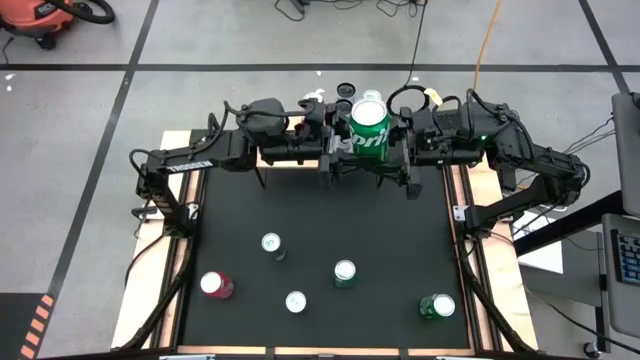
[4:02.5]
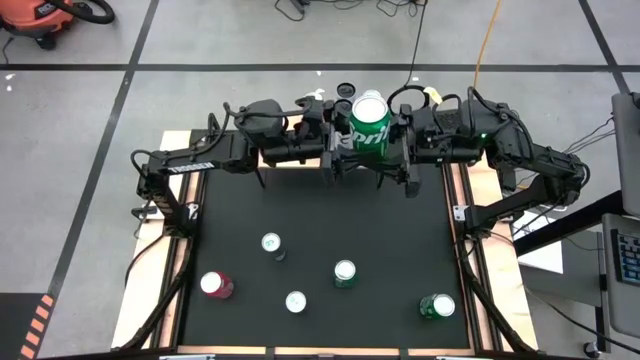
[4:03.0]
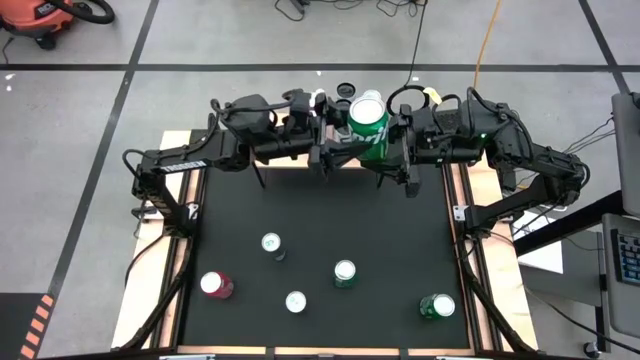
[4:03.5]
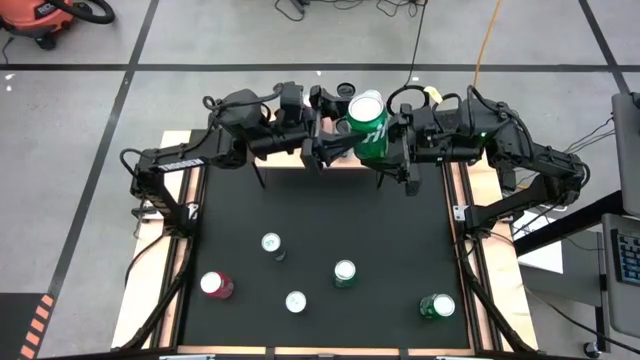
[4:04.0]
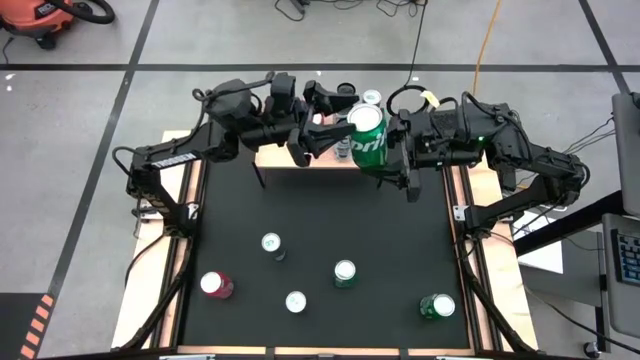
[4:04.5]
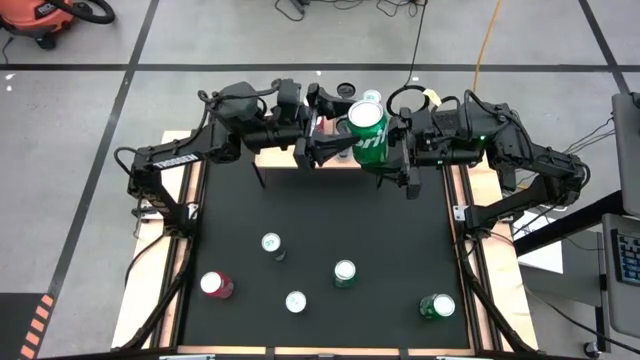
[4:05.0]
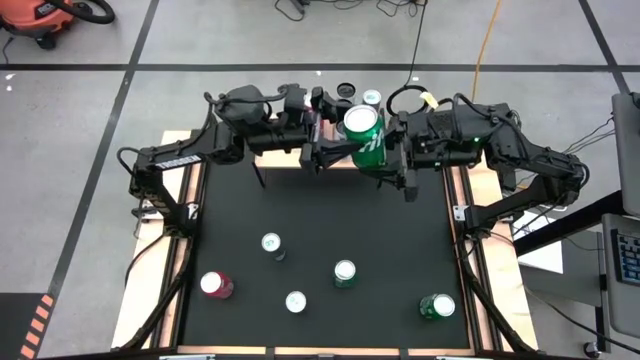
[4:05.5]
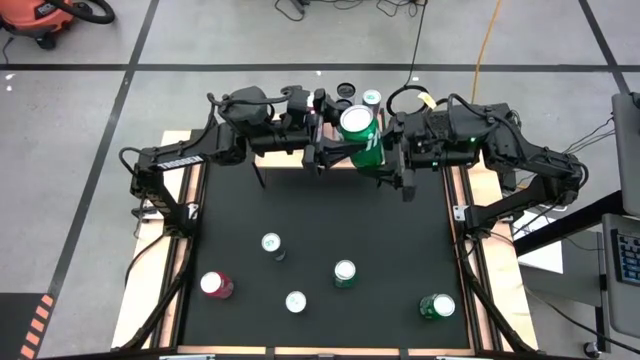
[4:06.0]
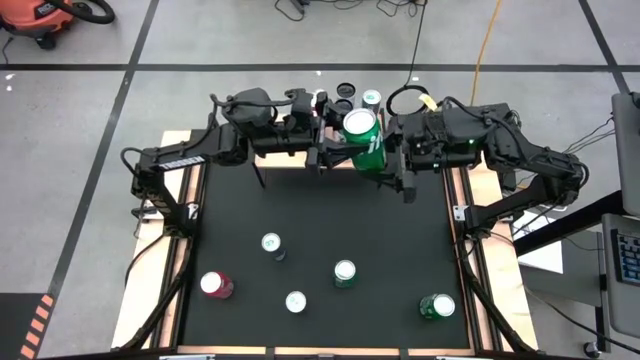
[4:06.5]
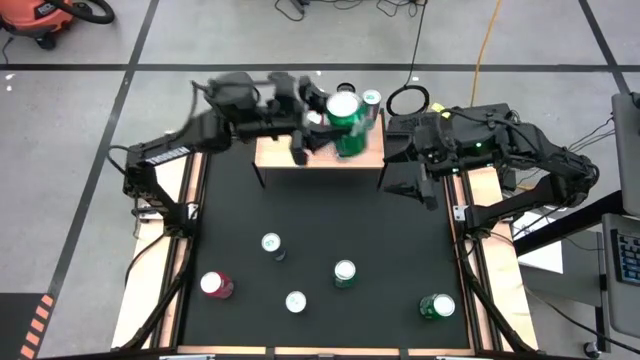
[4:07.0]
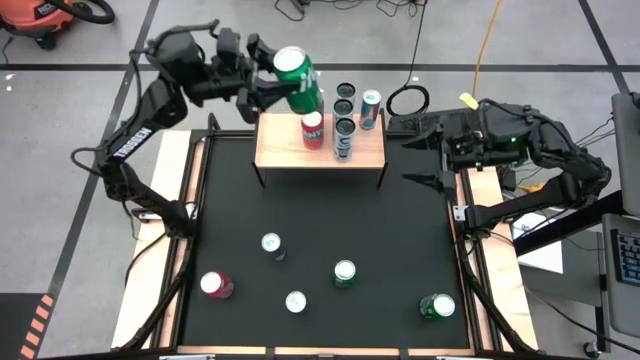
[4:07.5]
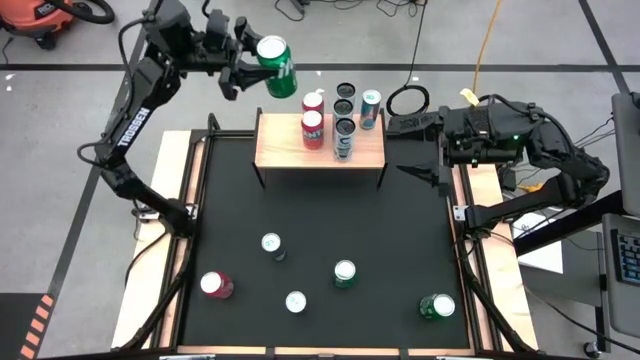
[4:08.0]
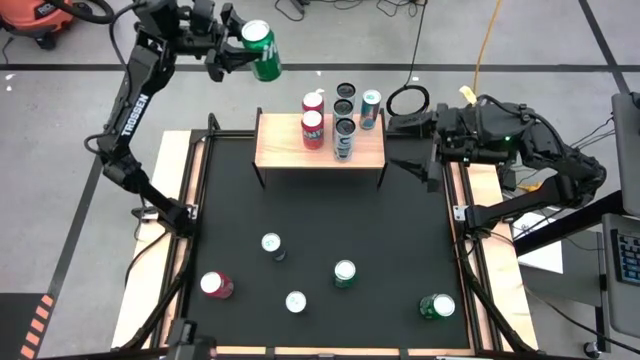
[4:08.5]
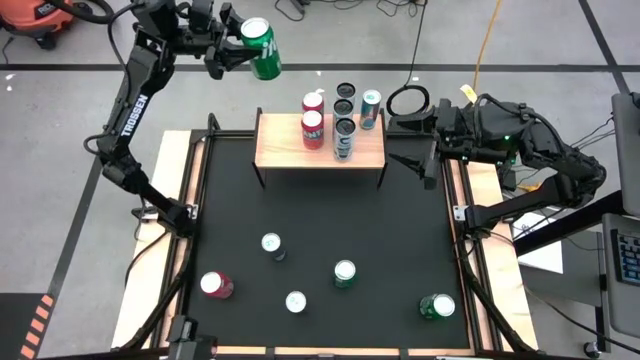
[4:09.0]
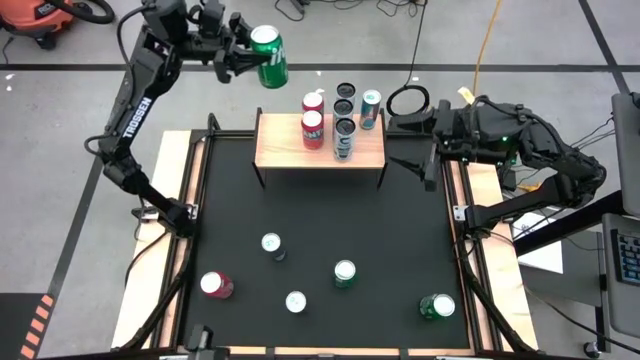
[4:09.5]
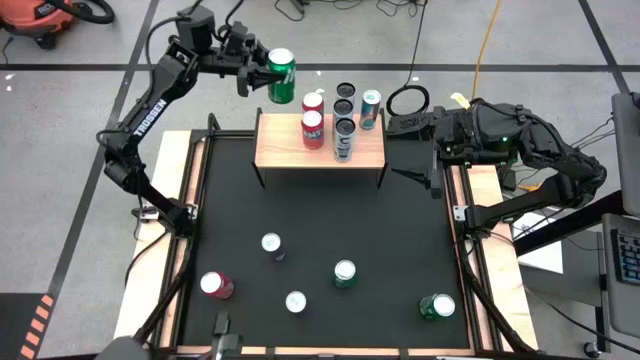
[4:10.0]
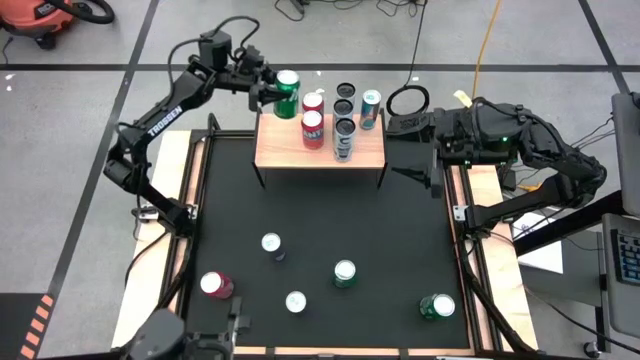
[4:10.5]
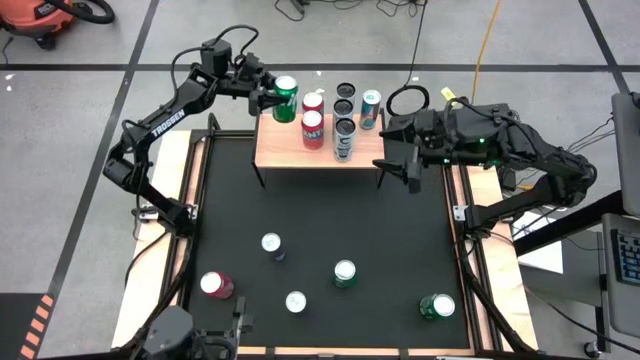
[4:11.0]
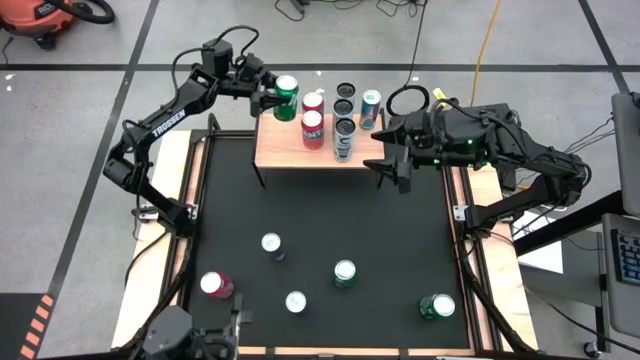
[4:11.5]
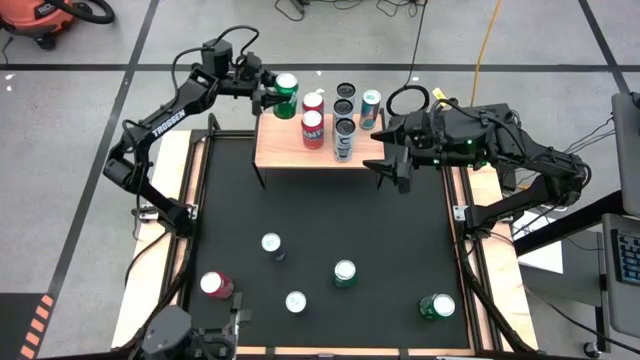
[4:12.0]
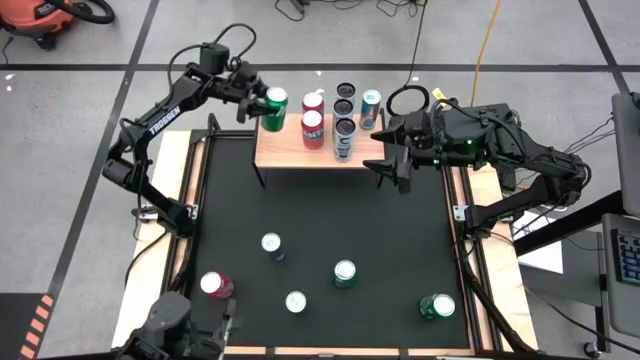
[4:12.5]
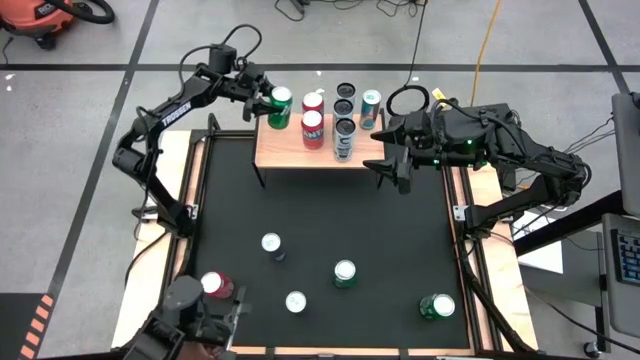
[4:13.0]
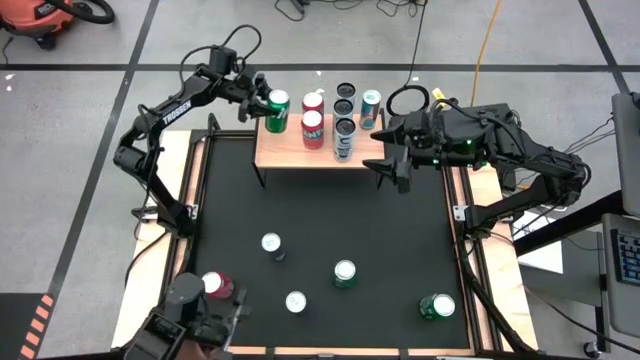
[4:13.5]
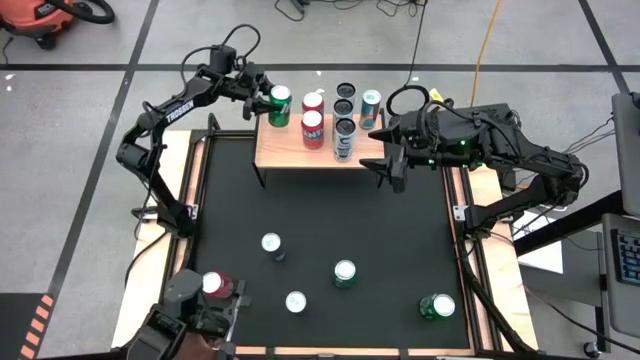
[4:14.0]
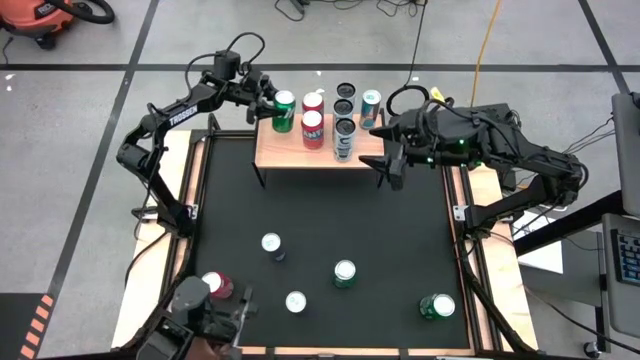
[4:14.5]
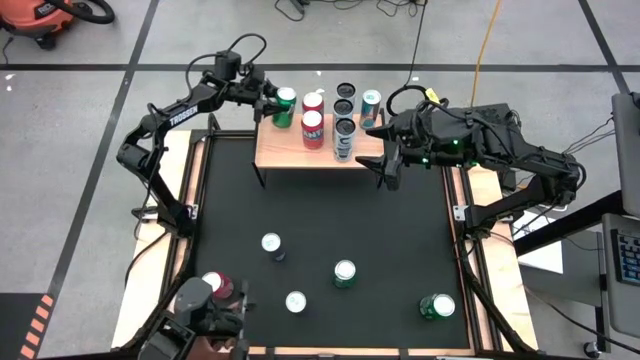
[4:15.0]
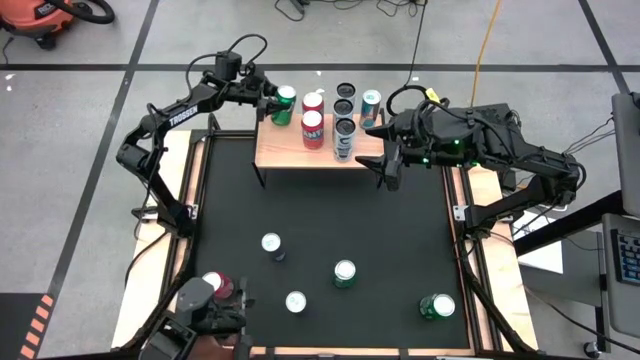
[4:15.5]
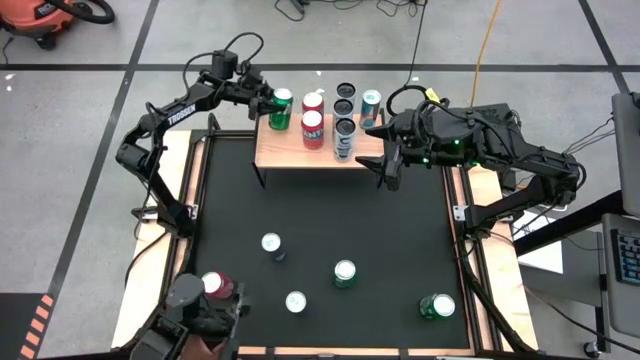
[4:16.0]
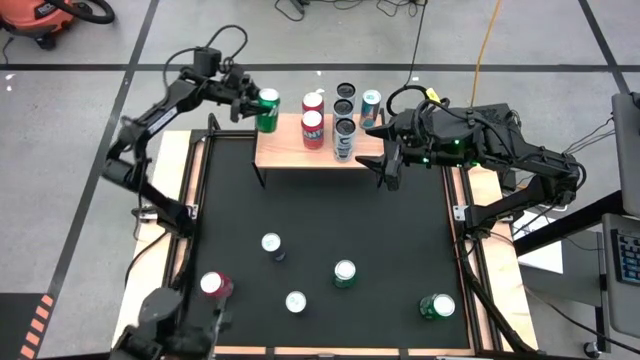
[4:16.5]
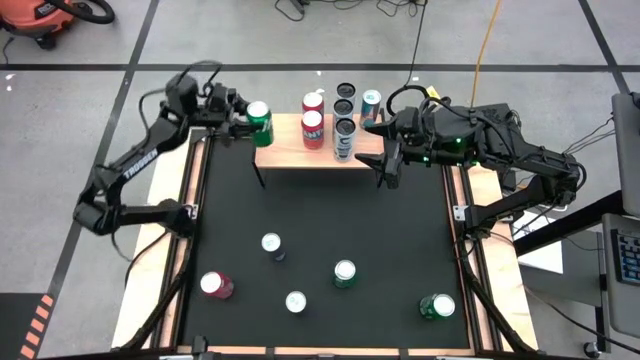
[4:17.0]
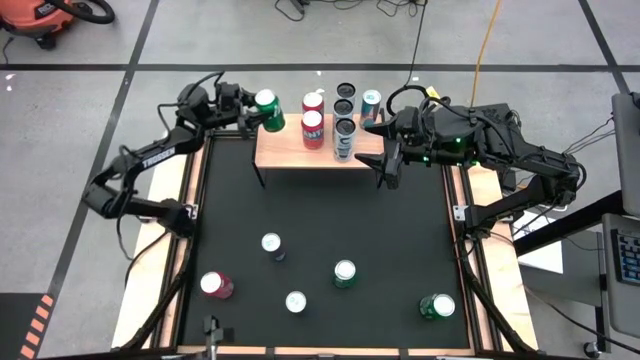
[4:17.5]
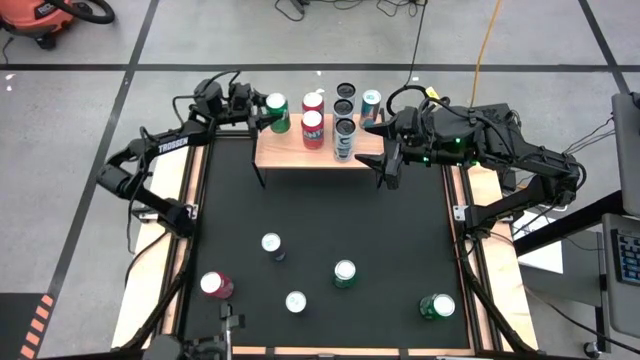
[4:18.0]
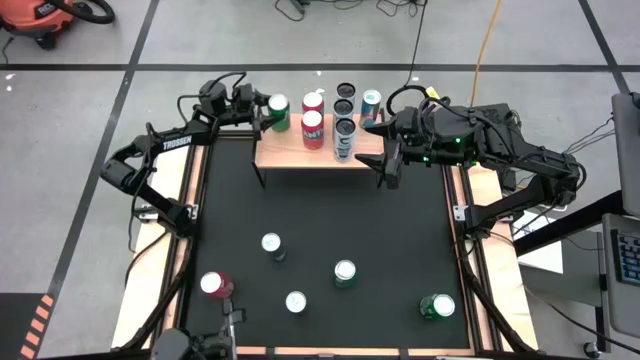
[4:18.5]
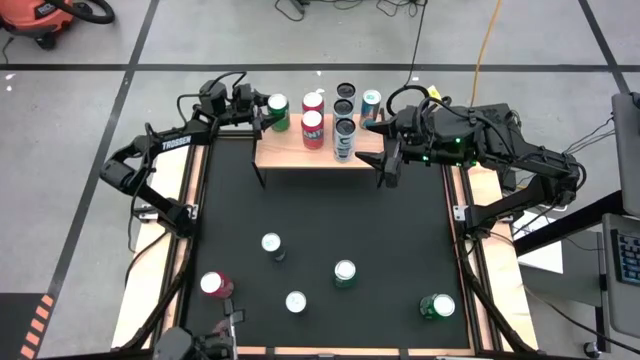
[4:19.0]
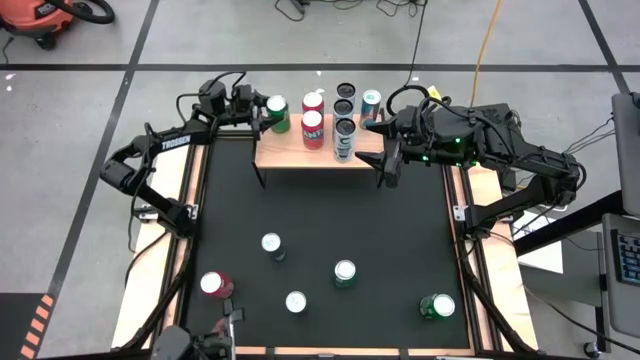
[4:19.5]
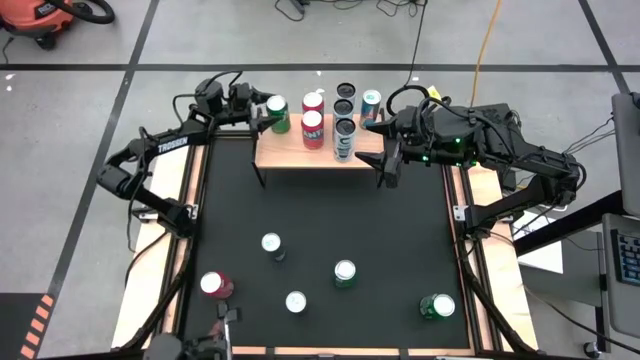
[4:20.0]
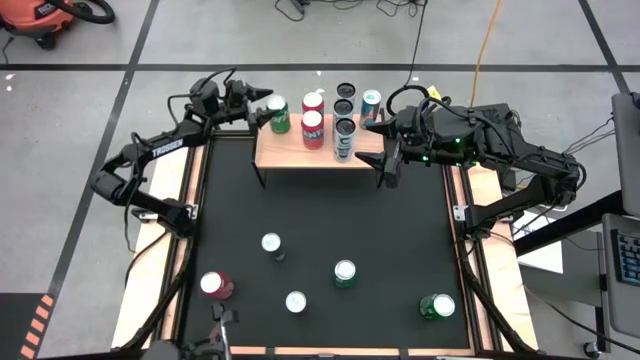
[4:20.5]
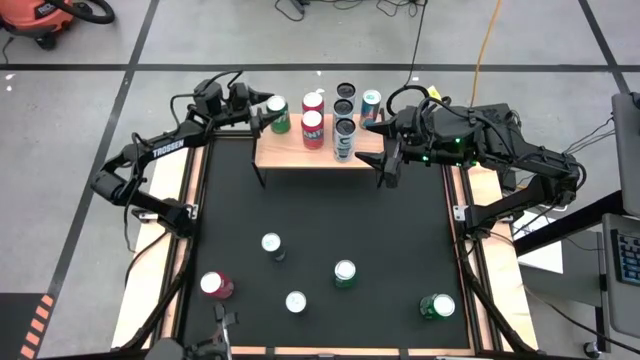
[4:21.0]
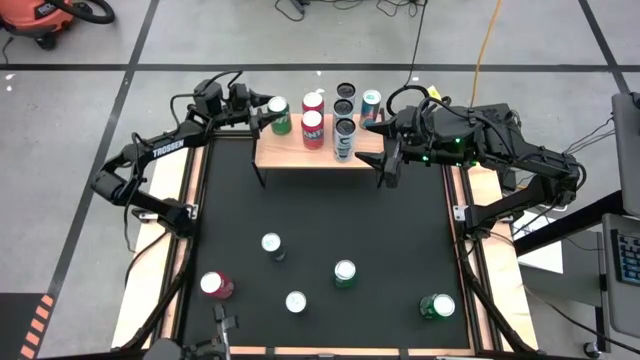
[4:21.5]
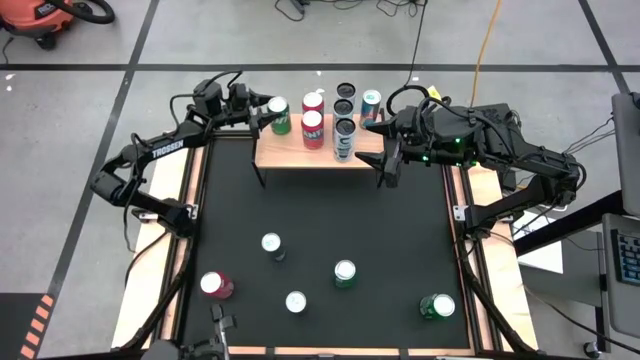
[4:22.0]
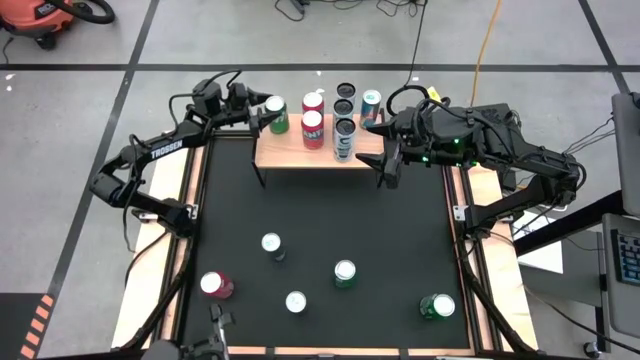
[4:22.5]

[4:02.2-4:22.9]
Task: Place canned beverage on shelf
Put the top center green soda can on the shelf
